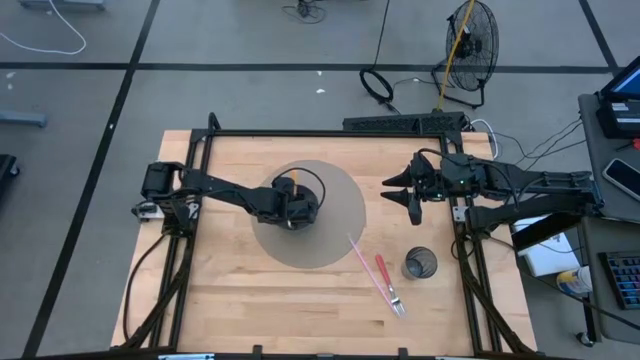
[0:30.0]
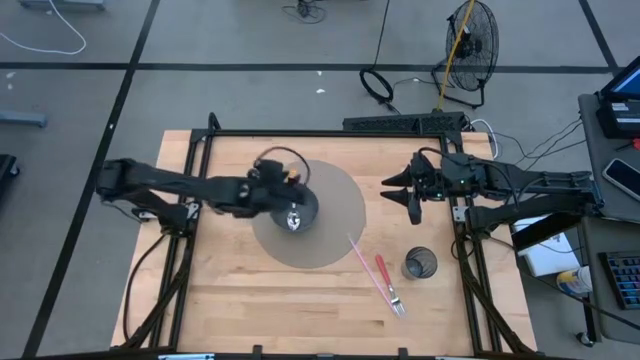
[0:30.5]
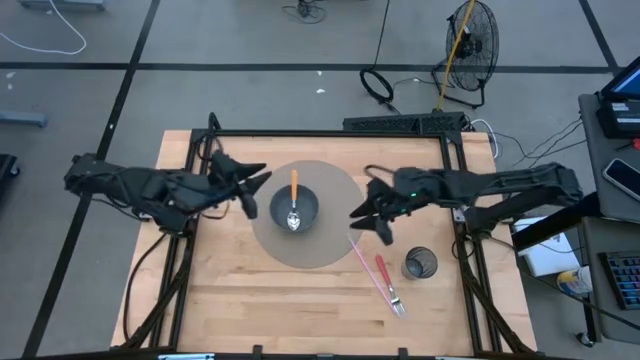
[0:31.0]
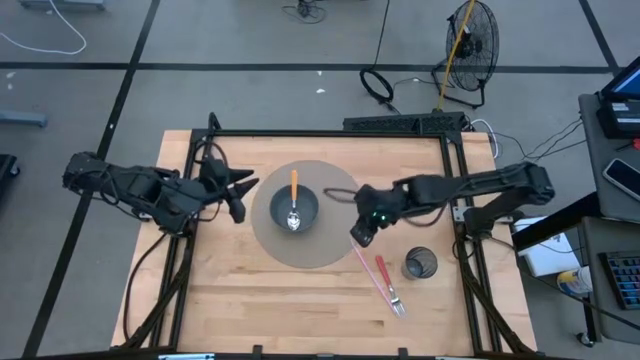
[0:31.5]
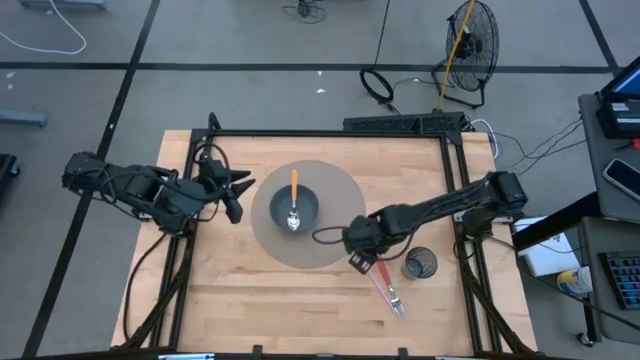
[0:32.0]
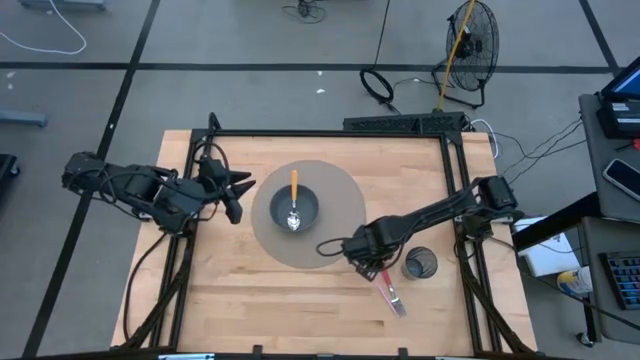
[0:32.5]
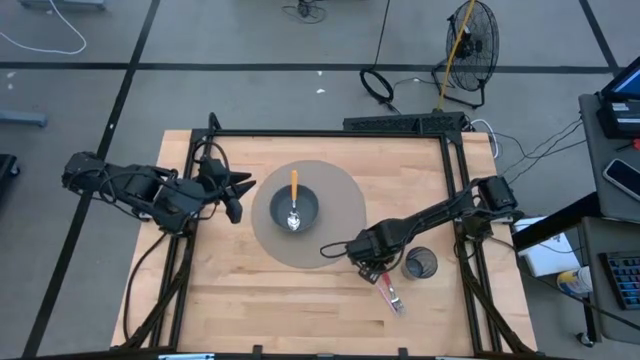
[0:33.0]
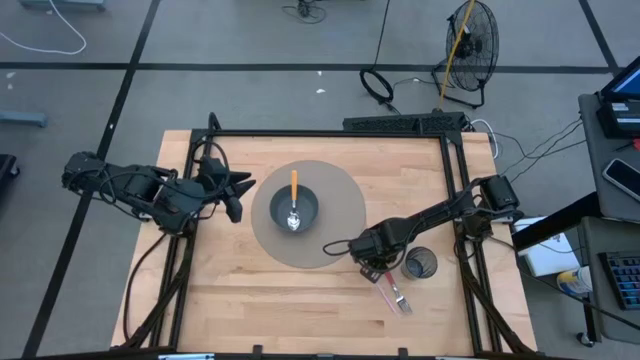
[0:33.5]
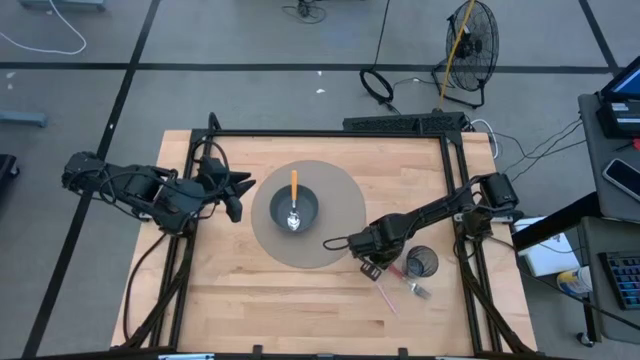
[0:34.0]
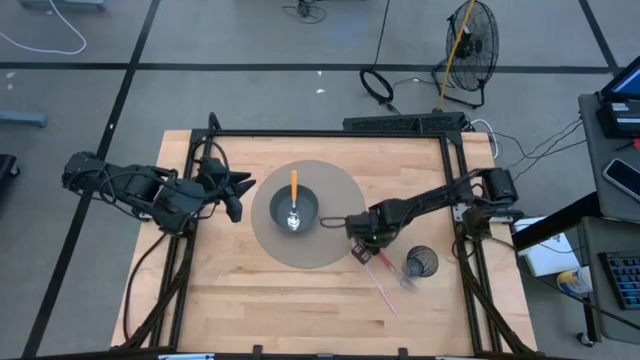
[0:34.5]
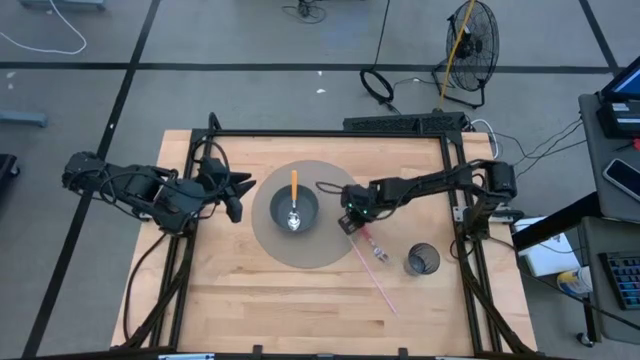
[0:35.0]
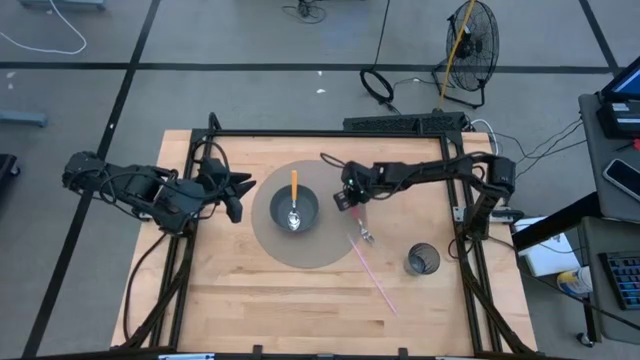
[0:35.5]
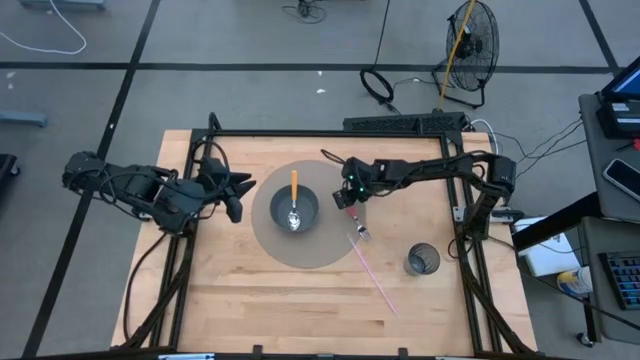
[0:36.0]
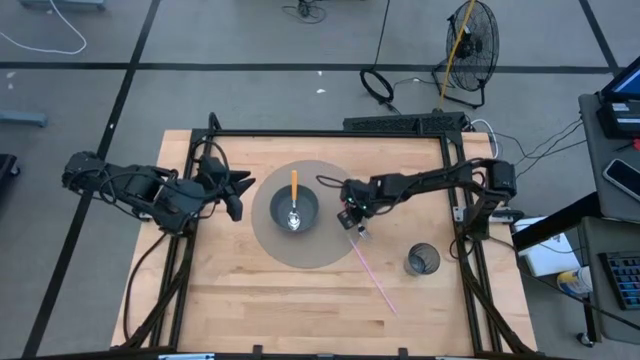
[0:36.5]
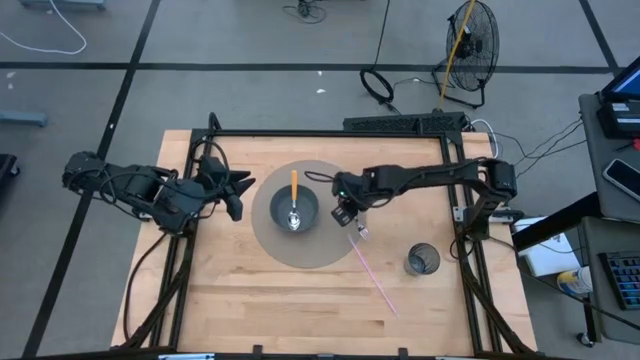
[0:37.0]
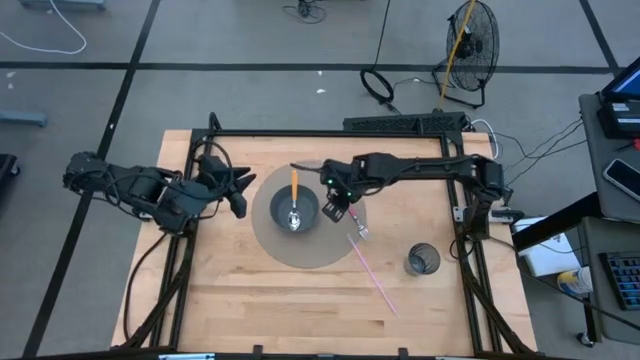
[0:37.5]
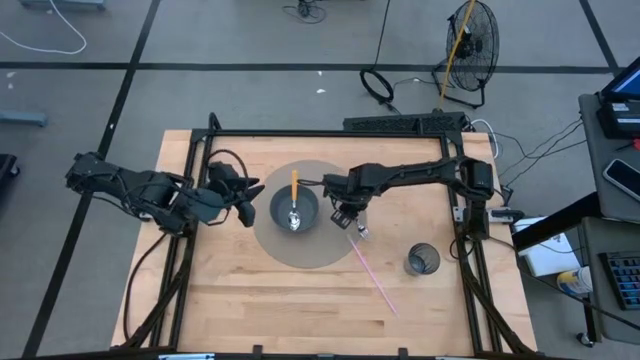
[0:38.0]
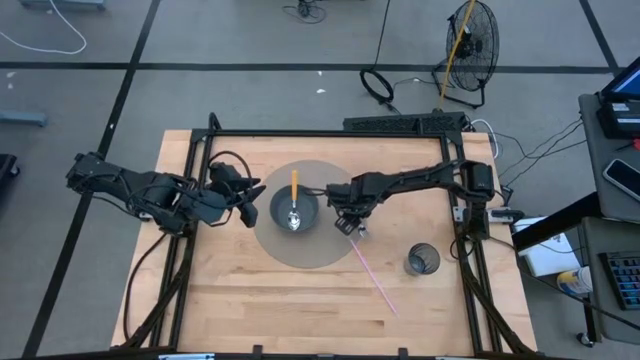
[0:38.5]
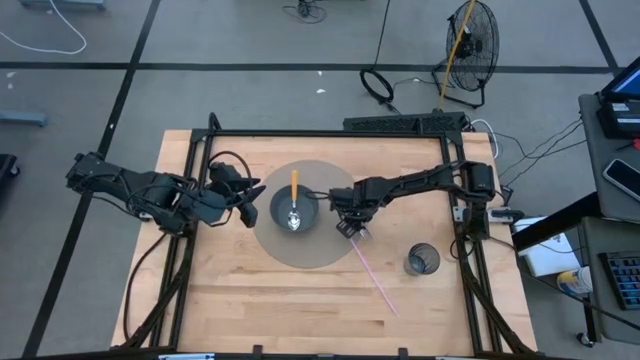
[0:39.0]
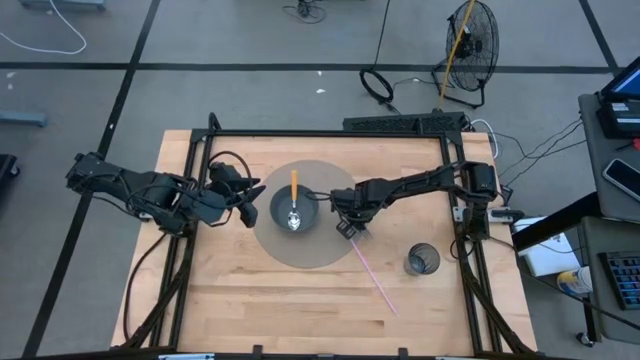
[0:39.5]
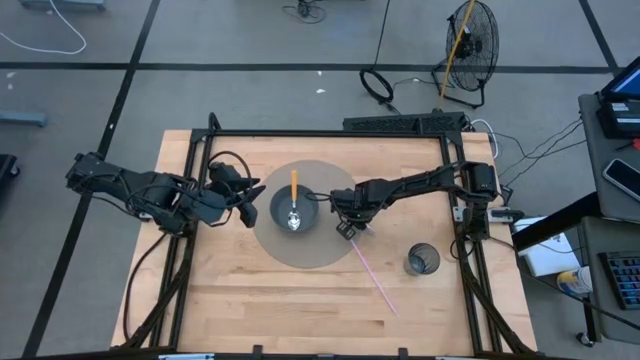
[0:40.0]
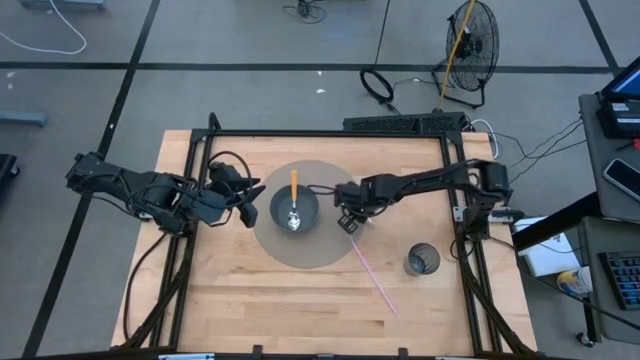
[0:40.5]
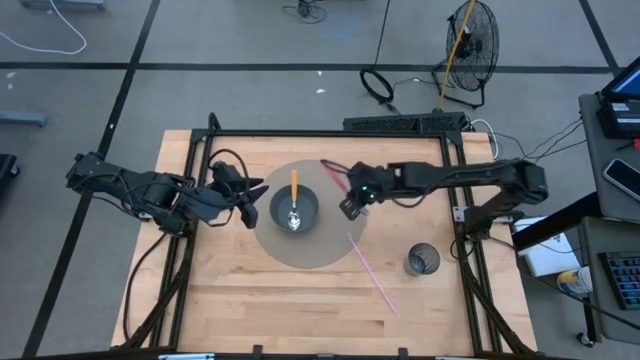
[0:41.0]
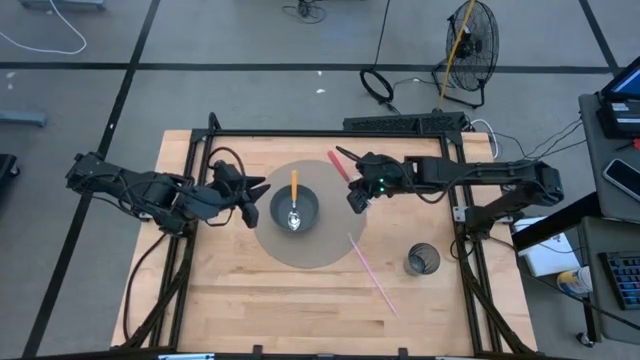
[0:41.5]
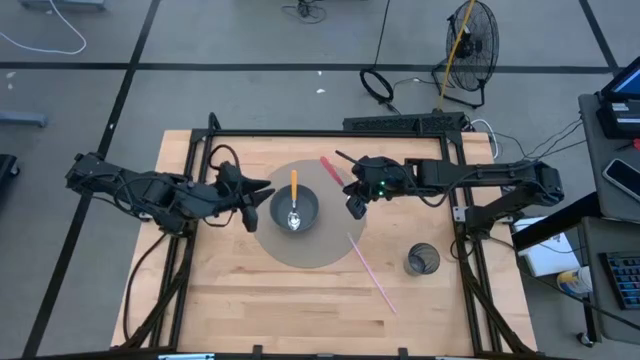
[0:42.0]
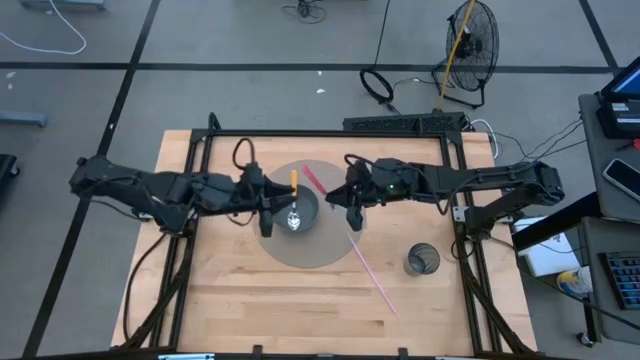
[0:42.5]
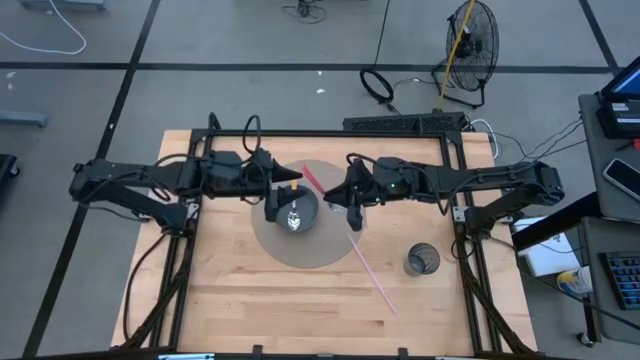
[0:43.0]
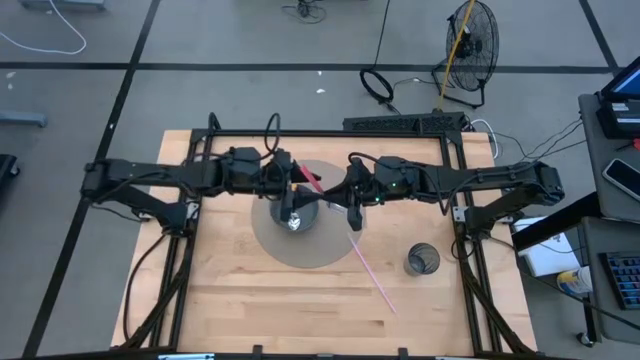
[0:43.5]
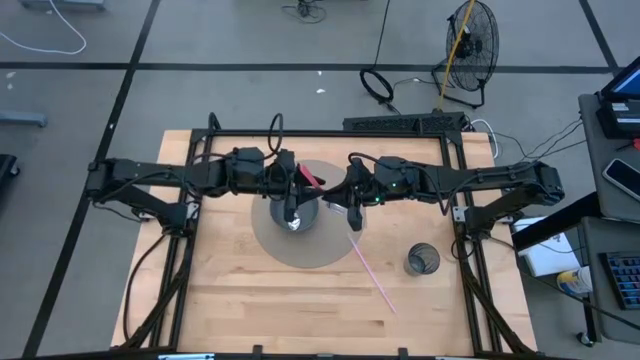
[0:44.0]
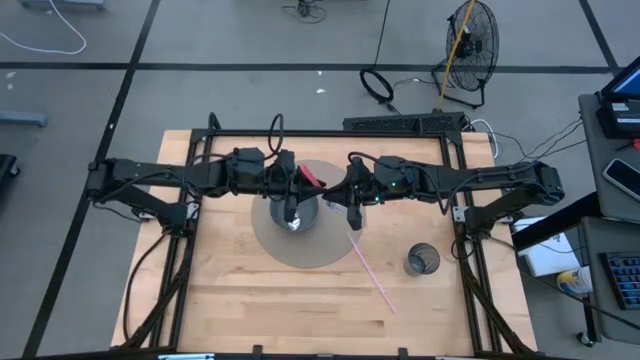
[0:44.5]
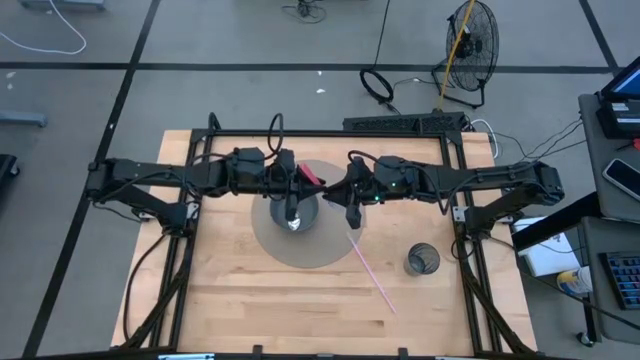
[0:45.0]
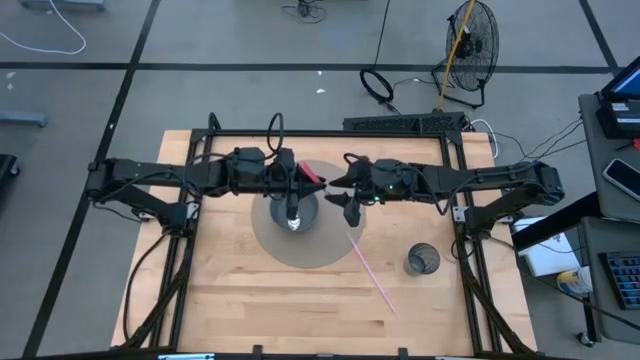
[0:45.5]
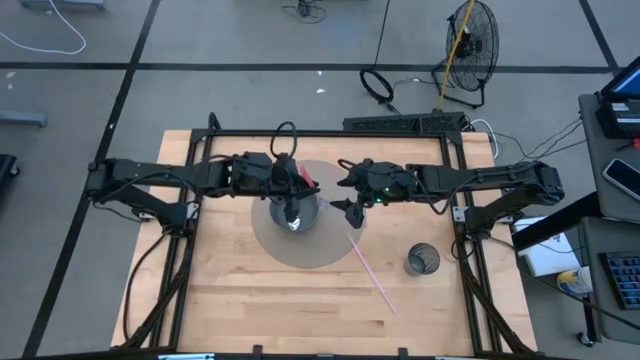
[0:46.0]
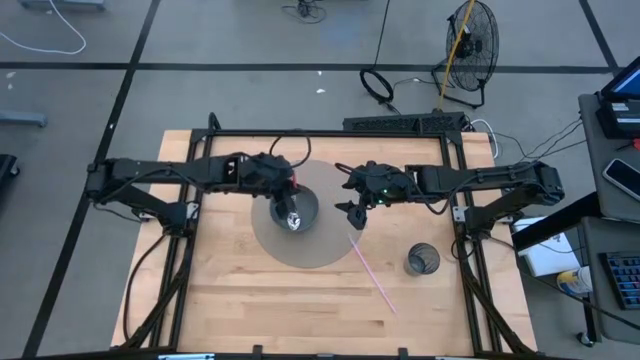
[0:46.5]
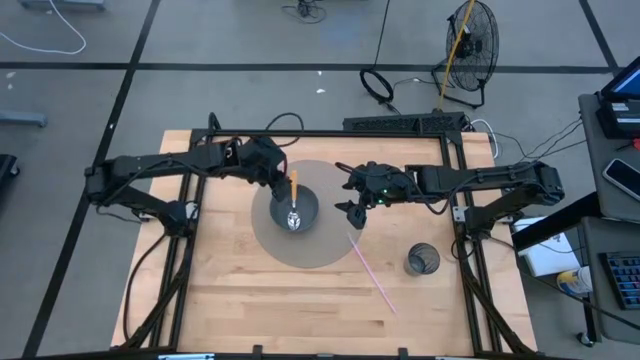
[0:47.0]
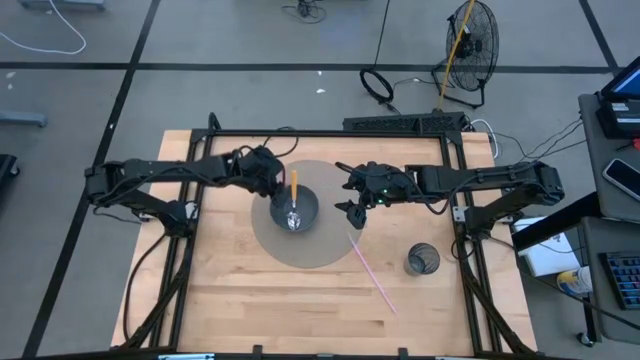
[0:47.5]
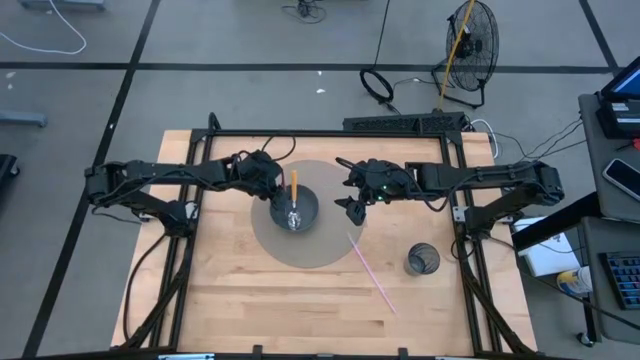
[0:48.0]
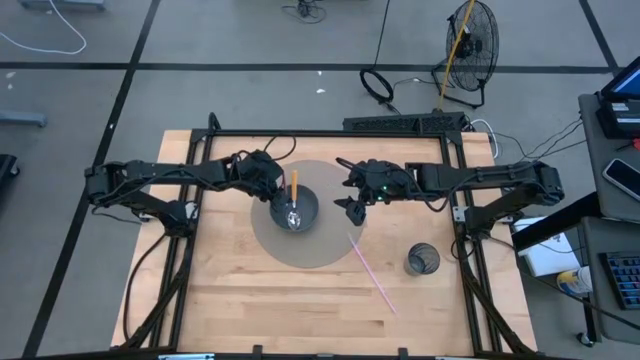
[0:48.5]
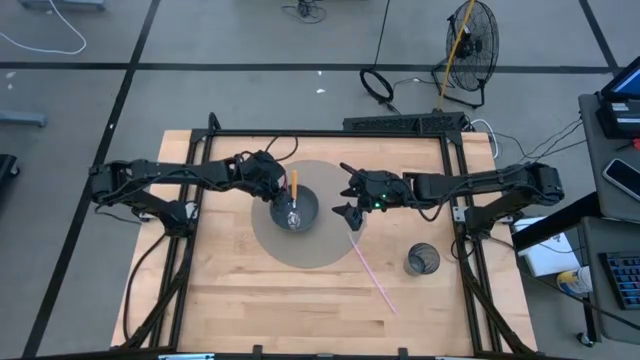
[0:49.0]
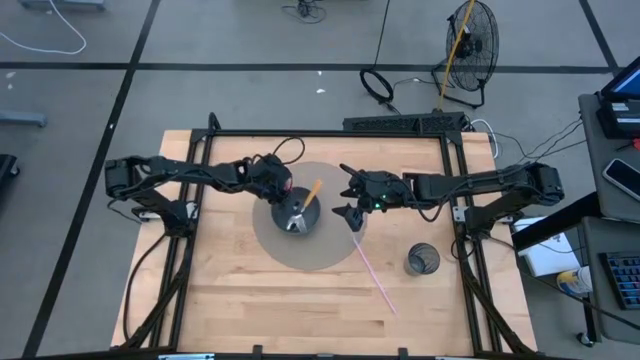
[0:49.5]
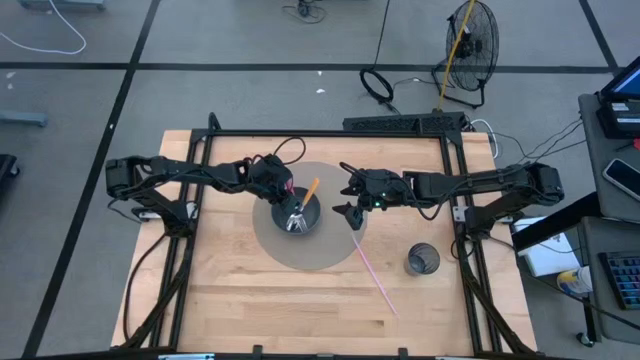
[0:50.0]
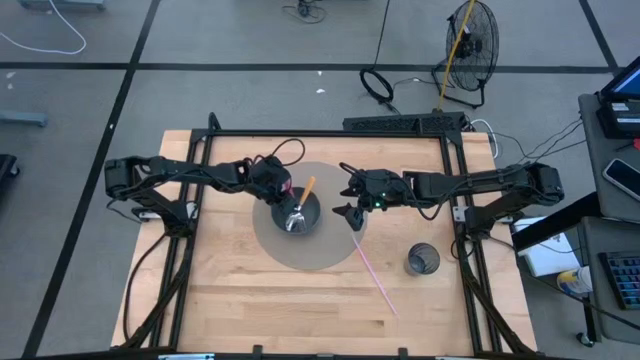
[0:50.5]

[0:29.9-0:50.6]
Task: Pick & Place Utensil
Put the pink fork into the gray bowl

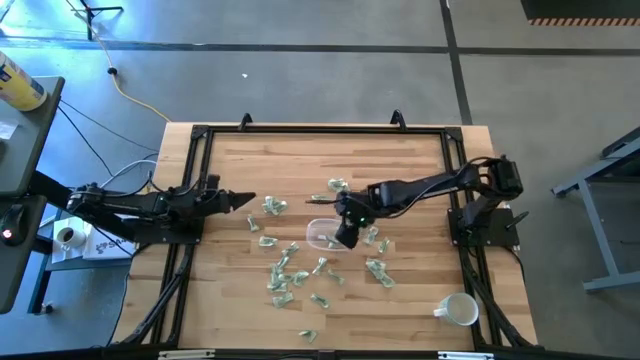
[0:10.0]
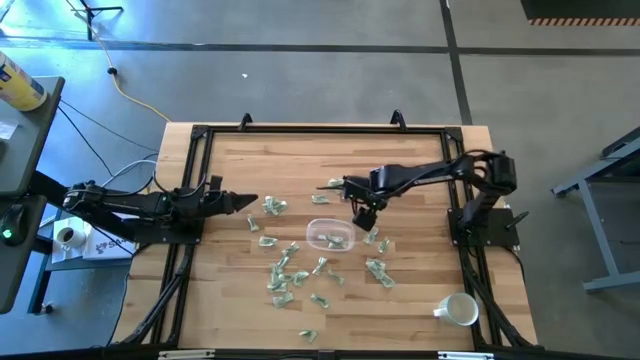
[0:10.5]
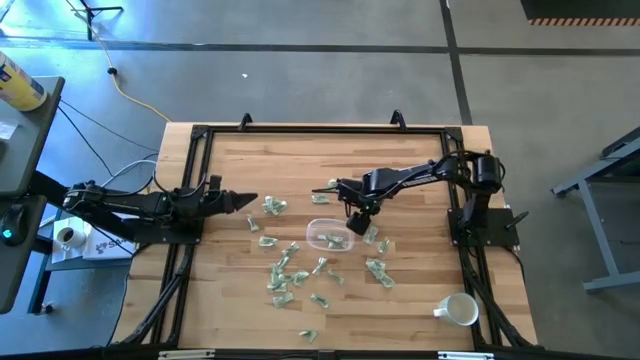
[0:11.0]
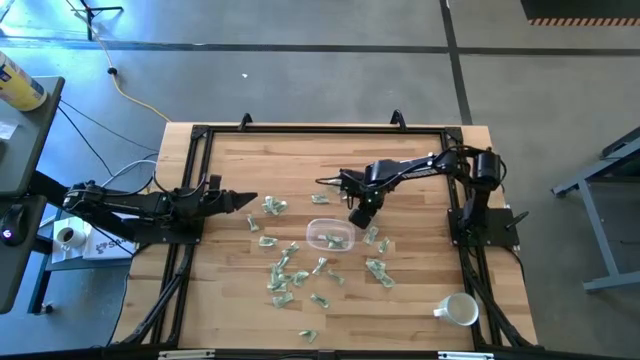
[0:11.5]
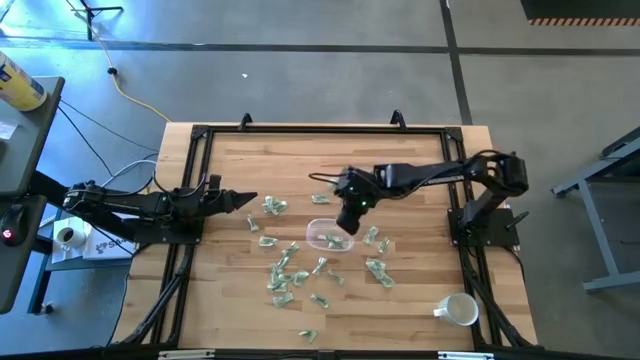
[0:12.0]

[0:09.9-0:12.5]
Task: Pick and place Stevia / Truvia into bins
Put the green stevia packet into the transparent container
